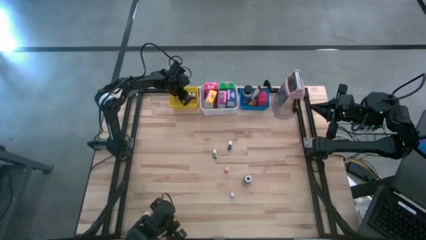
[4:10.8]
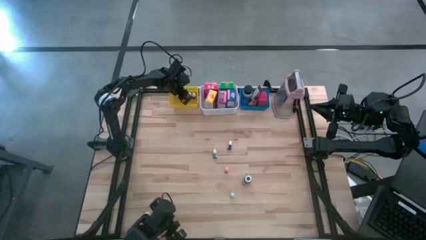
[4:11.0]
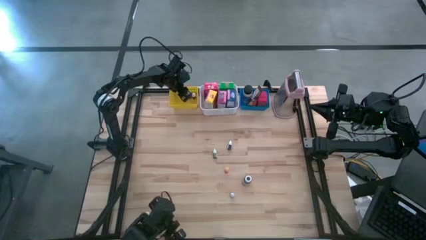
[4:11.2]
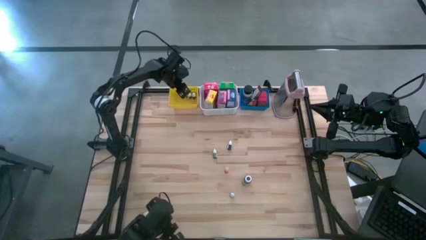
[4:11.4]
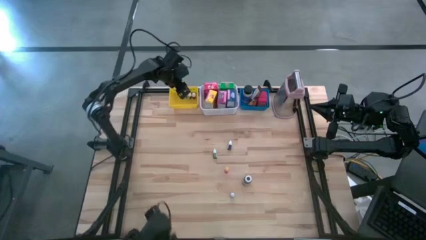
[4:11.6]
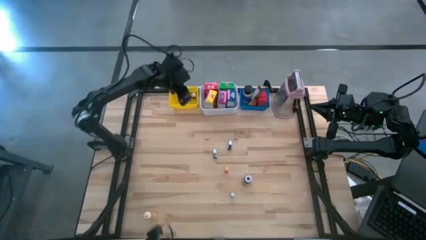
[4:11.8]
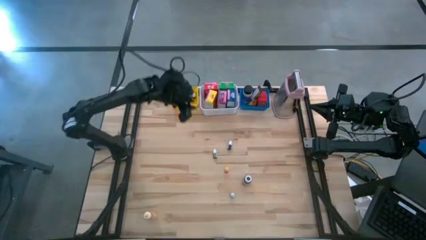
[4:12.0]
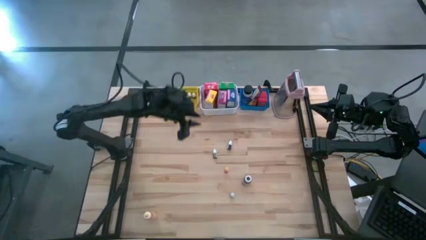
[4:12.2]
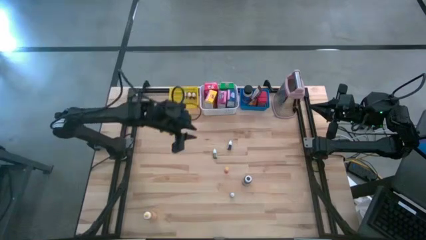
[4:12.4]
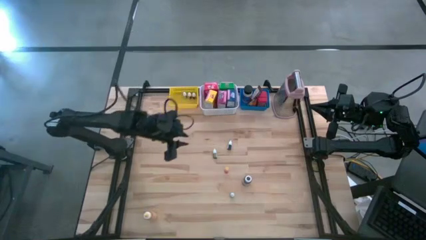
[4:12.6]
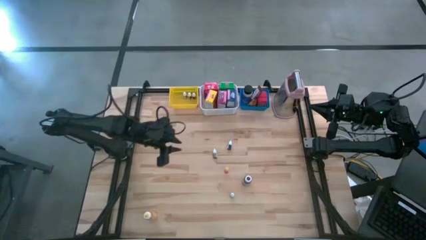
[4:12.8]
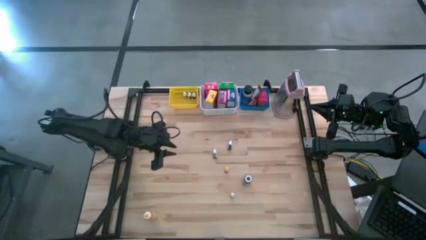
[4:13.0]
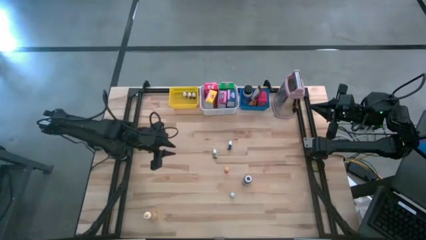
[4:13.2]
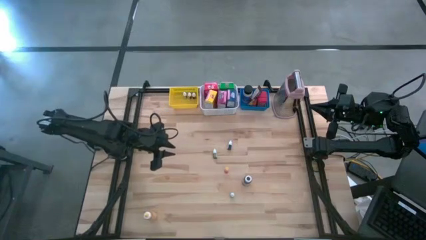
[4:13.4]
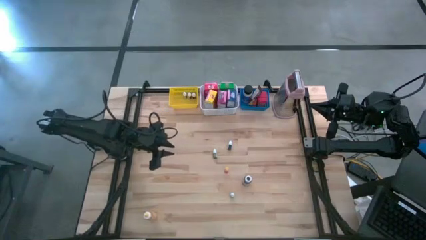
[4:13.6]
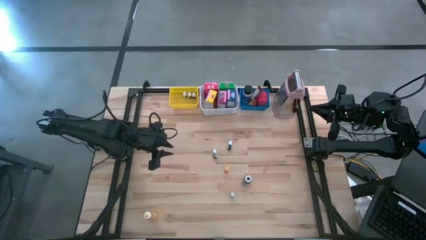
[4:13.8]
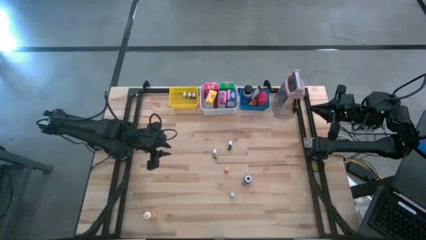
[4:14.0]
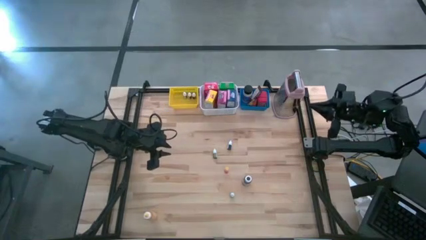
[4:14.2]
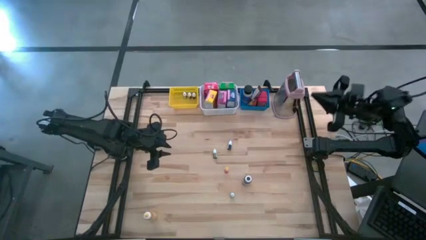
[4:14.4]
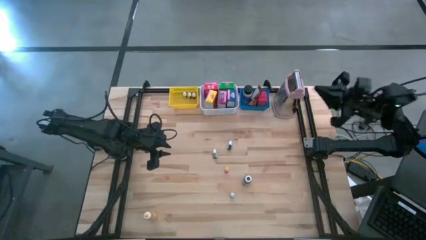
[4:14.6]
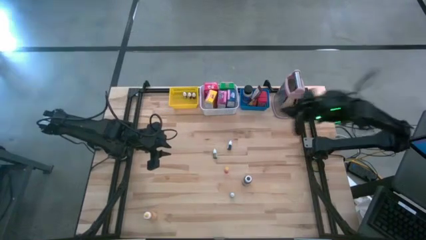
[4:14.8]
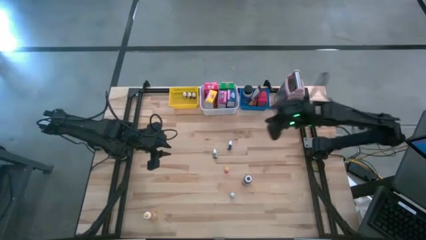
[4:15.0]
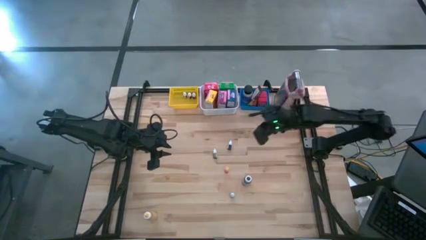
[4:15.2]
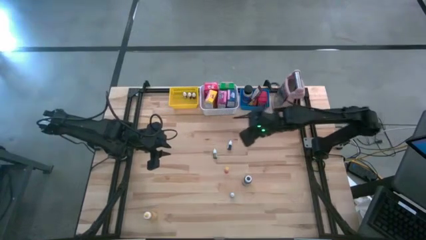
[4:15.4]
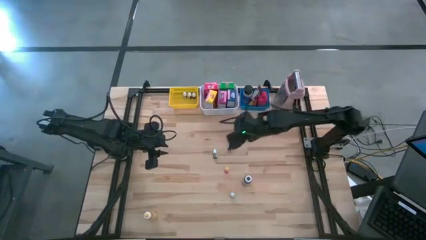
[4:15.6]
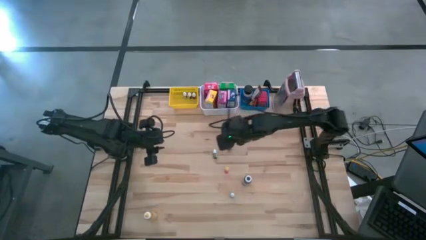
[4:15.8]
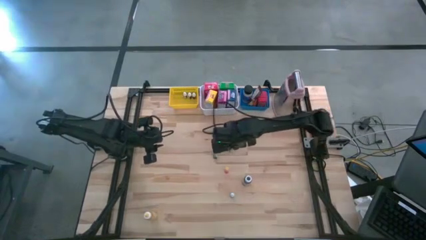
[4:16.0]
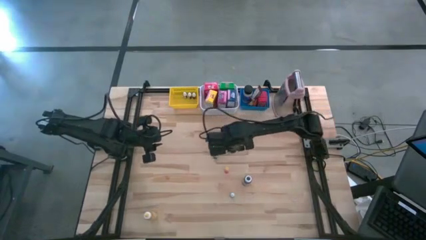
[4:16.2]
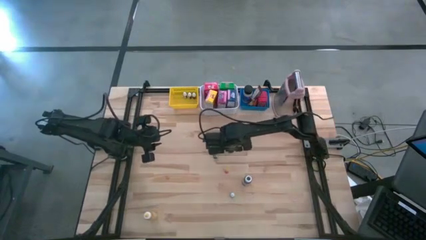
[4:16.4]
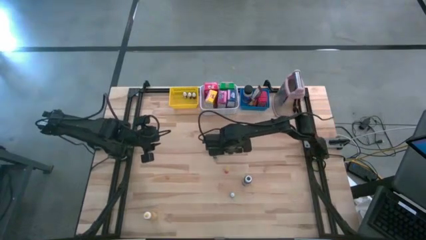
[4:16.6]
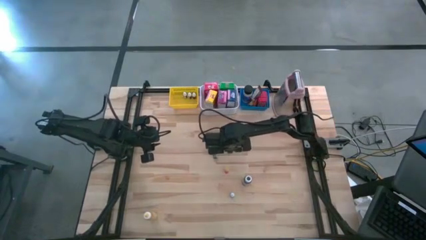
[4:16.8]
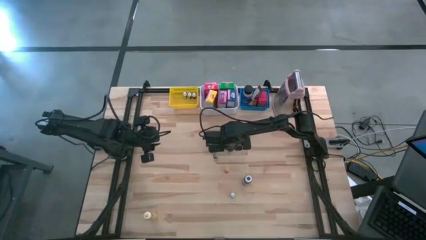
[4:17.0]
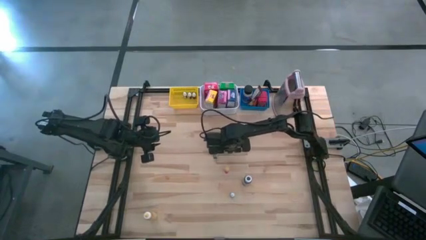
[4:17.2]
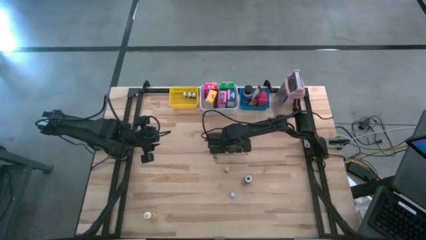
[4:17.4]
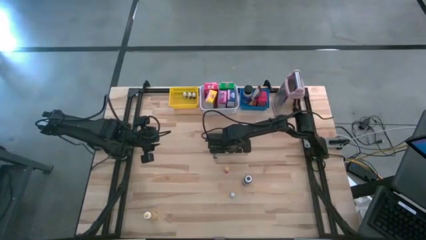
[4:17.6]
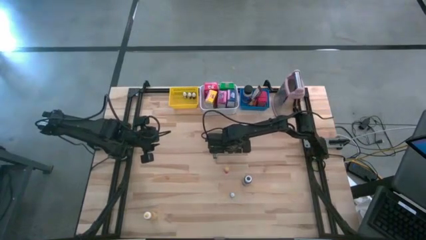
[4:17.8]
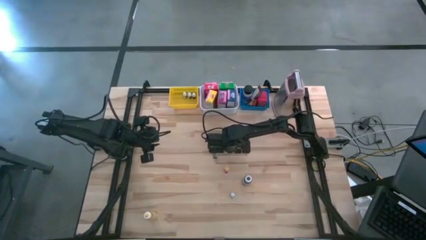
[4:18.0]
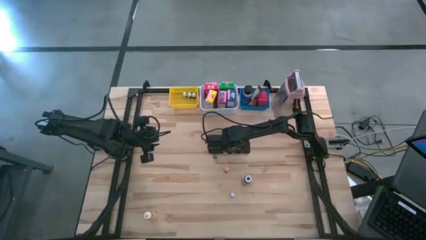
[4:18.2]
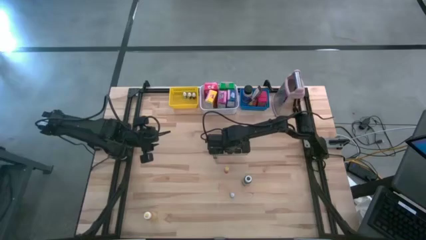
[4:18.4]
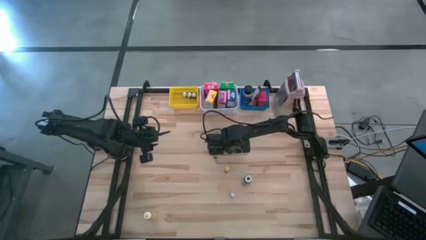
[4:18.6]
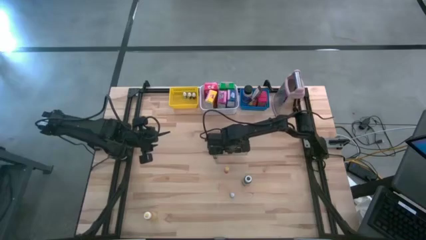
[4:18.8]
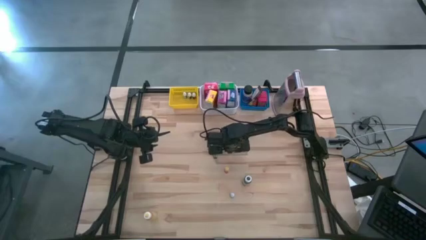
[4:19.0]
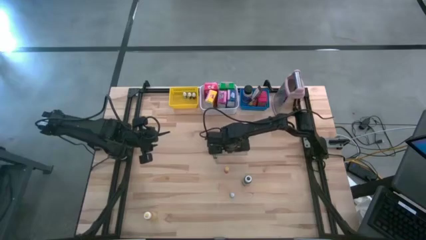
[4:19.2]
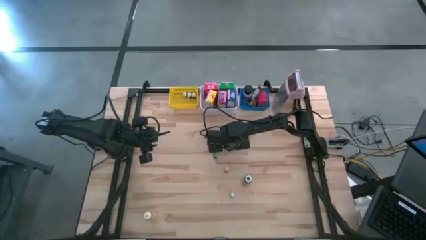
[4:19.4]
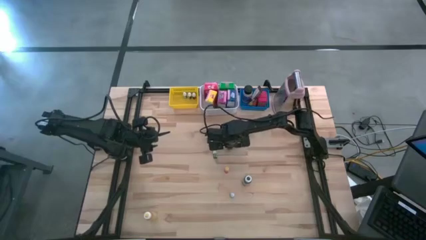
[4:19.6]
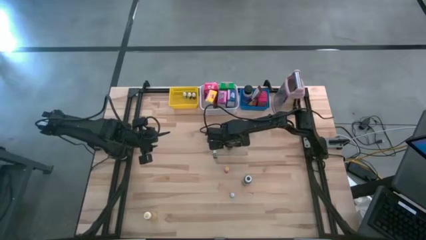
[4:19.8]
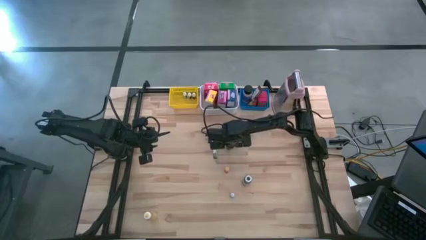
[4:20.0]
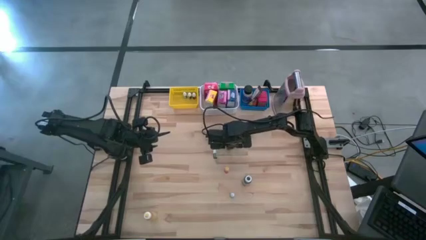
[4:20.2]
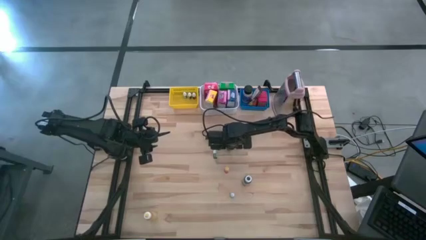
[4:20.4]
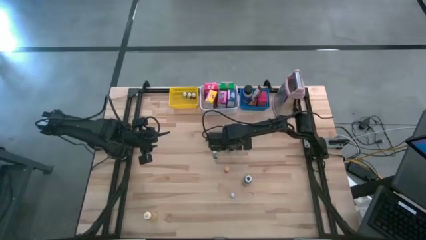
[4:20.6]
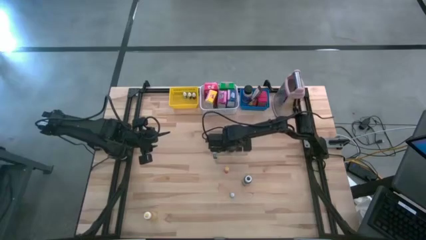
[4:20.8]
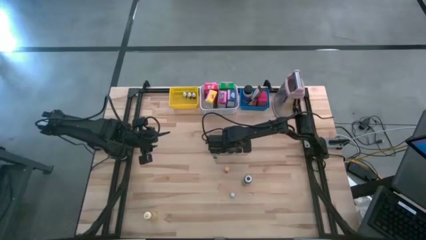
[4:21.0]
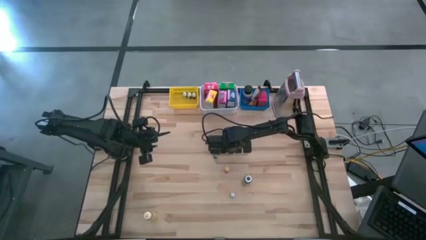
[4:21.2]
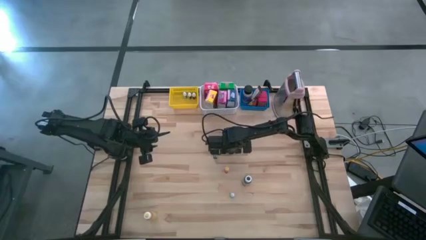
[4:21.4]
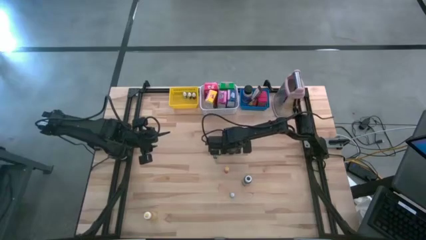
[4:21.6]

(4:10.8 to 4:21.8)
Task: Pick & Place Kitchen Items
Put the black food coloring bottle into the yellow basket

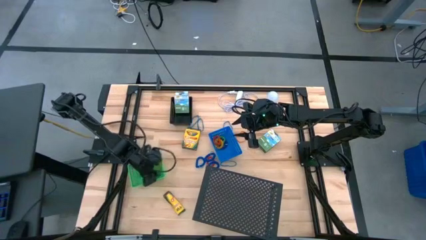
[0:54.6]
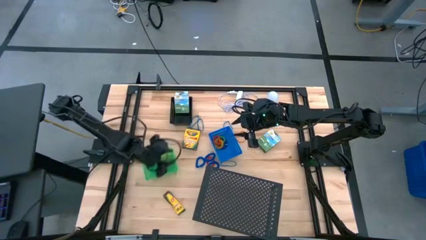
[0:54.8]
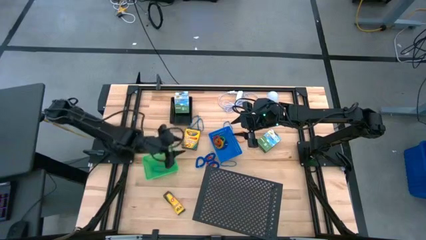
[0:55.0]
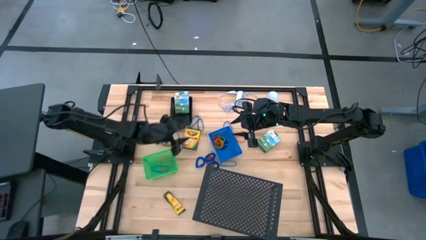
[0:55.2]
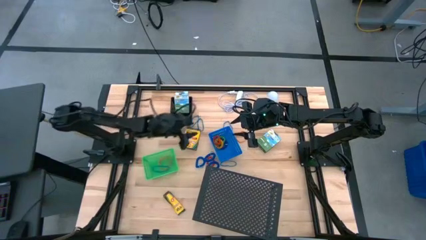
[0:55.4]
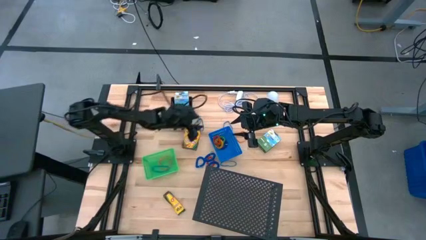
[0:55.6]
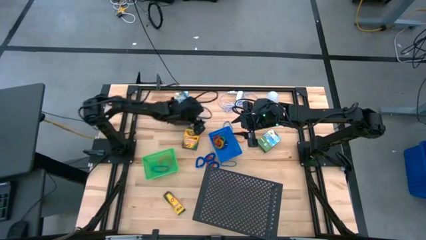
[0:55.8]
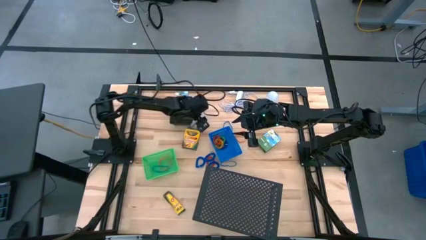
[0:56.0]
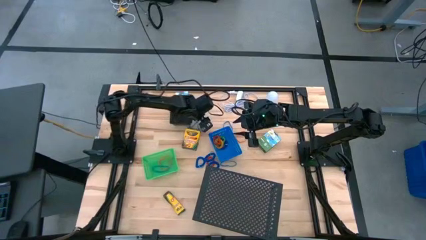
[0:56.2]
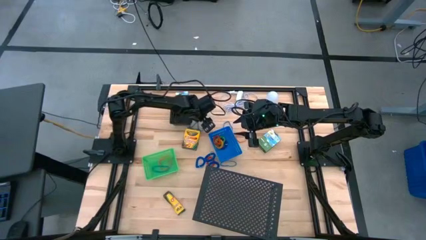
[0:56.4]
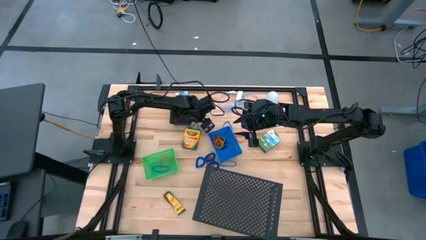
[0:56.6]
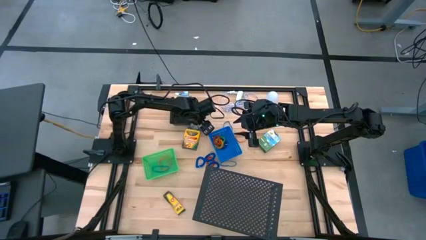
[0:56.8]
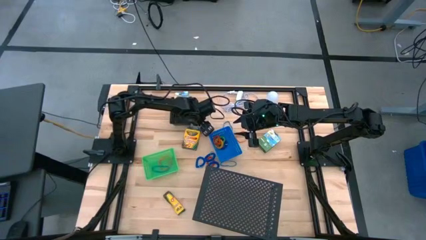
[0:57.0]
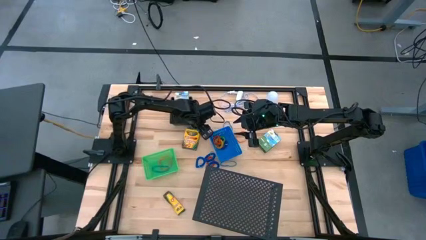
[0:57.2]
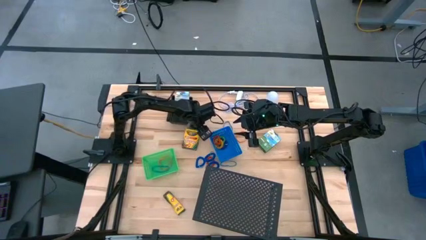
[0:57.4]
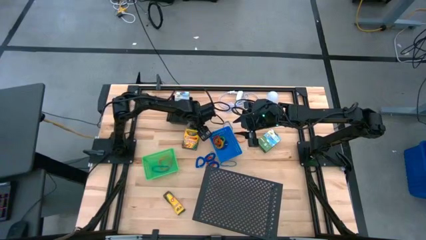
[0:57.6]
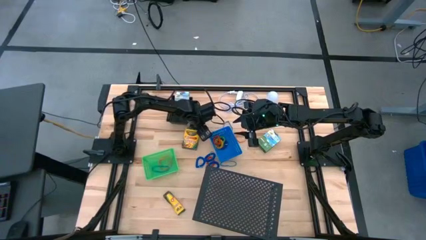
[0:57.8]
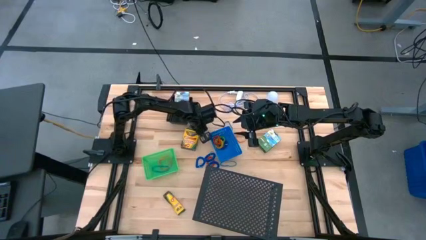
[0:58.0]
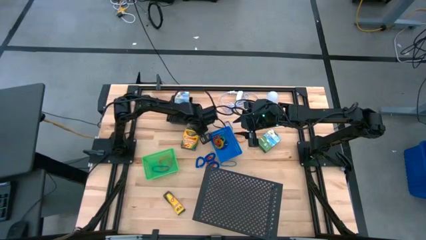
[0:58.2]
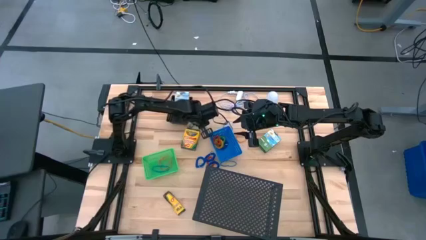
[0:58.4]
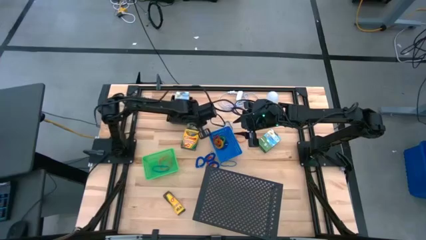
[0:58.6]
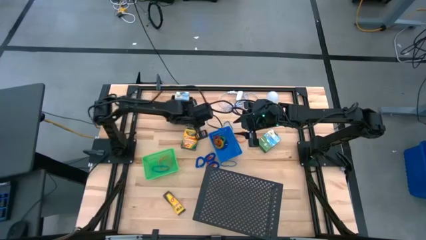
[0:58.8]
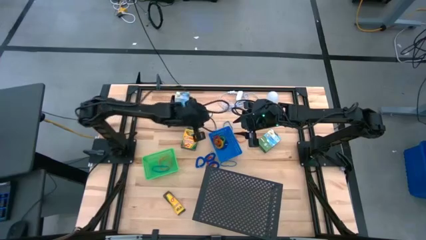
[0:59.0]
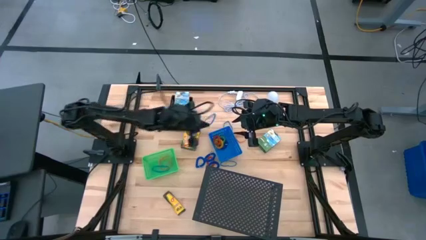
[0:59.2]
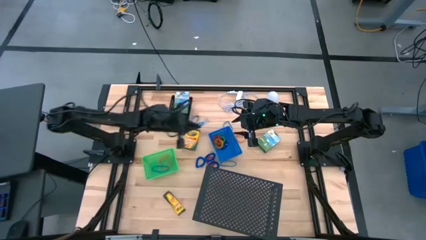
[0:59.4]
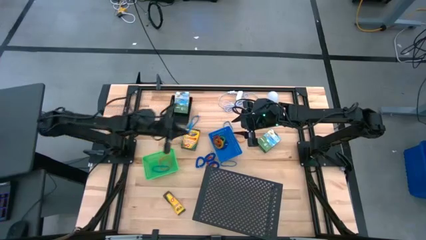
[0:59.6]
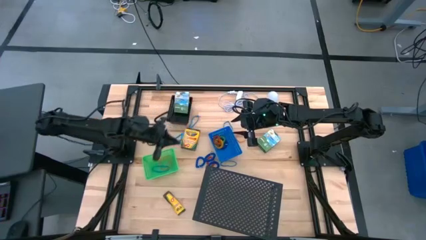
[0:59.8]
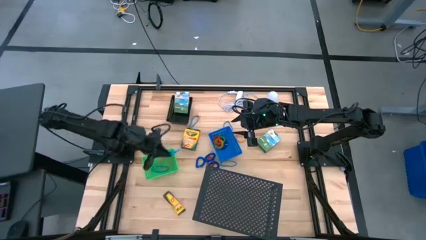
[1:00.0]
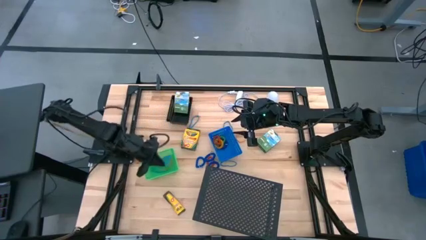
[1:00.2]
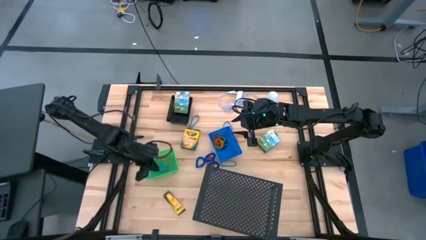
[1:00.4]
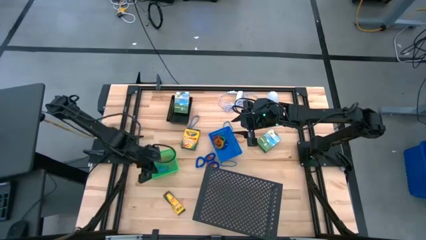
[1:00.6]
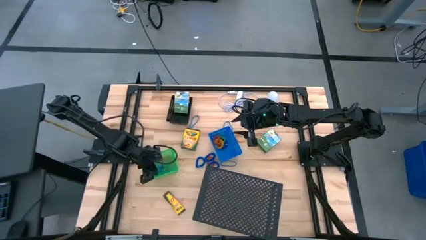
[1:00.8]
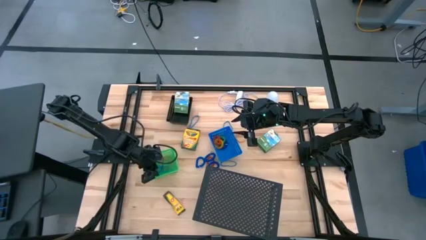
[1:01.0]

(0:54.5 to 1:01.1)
Task: Pick & Place Office Desk Supplies
Put the middle blue rubber band into the green bin
